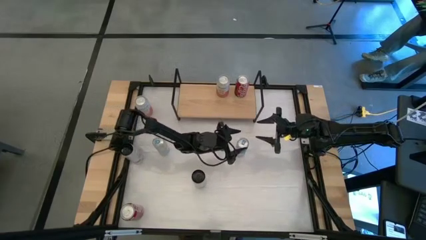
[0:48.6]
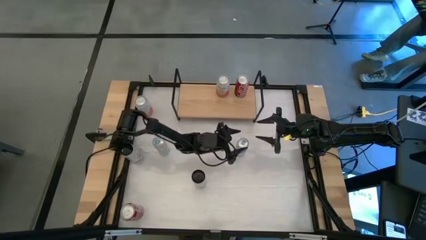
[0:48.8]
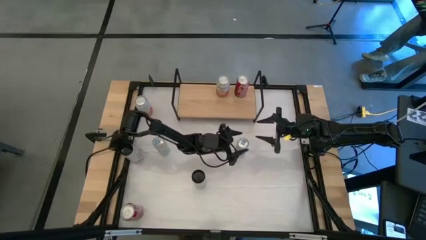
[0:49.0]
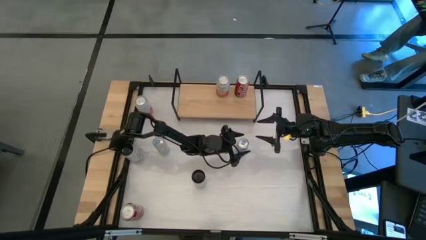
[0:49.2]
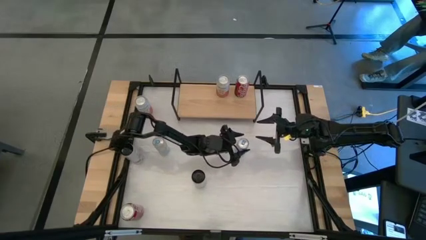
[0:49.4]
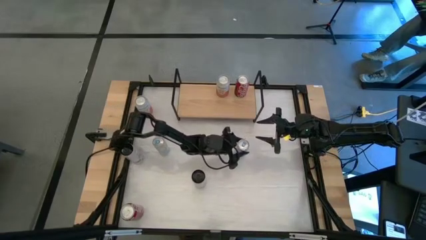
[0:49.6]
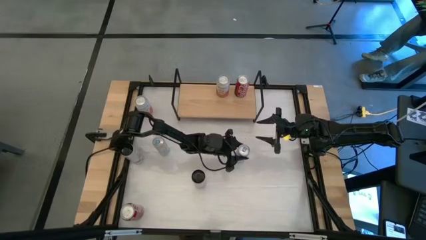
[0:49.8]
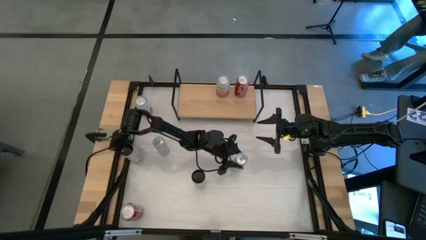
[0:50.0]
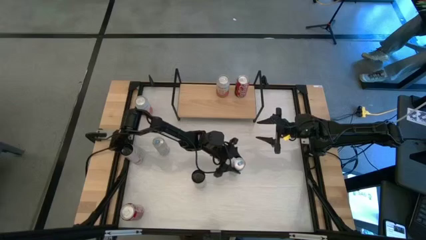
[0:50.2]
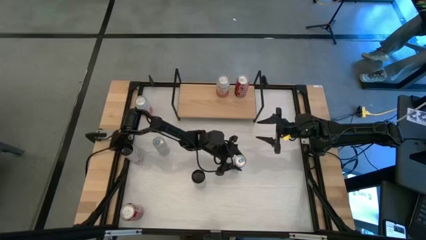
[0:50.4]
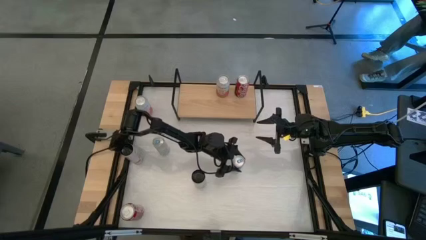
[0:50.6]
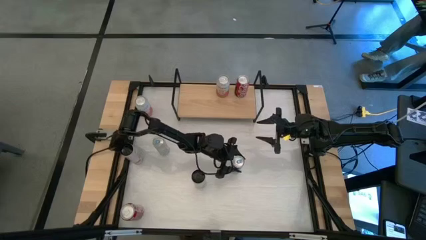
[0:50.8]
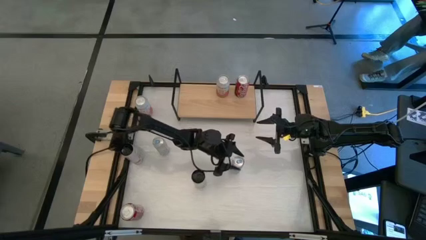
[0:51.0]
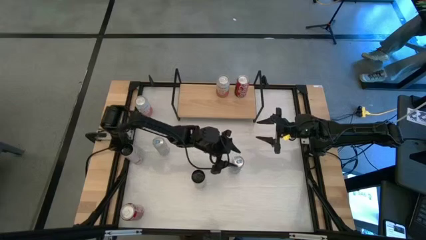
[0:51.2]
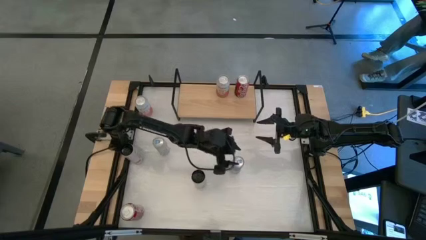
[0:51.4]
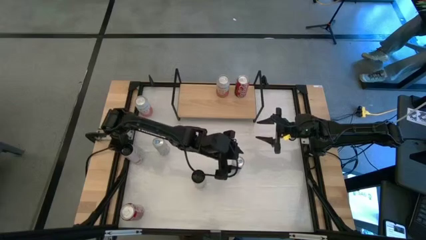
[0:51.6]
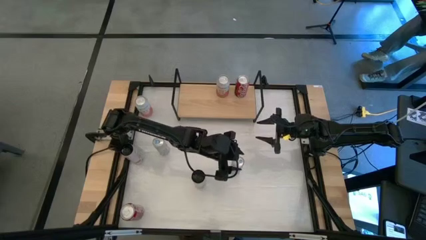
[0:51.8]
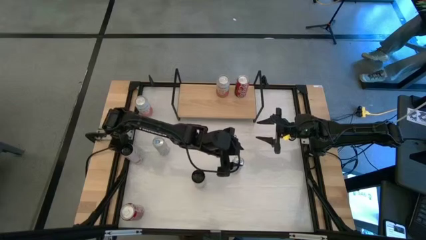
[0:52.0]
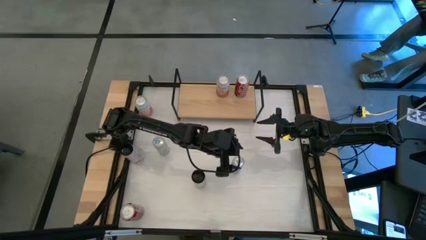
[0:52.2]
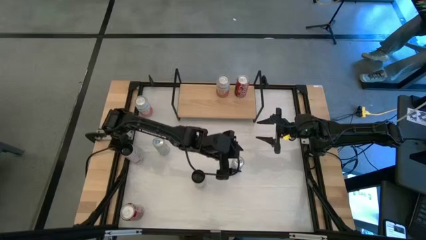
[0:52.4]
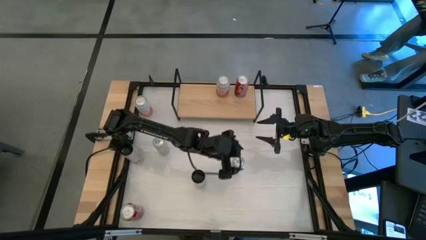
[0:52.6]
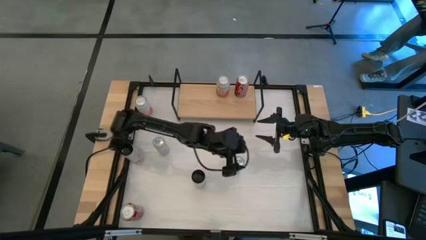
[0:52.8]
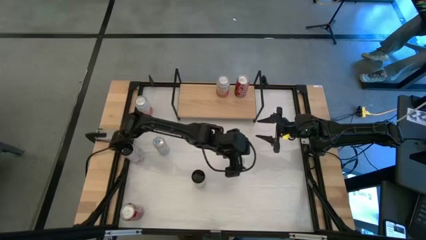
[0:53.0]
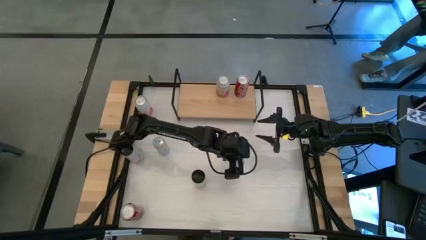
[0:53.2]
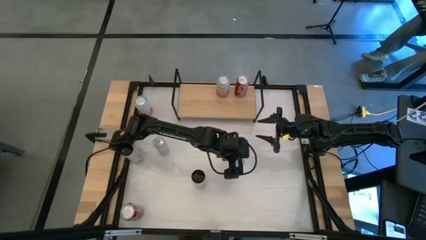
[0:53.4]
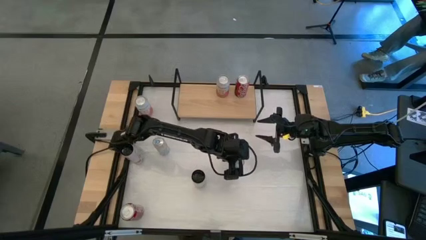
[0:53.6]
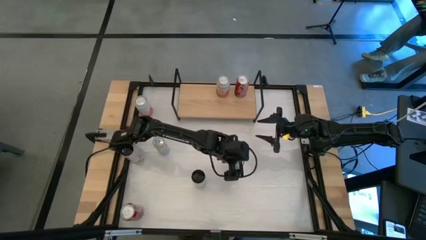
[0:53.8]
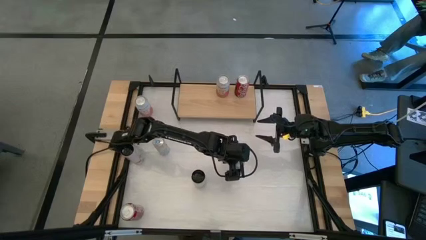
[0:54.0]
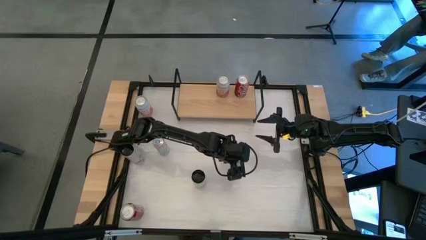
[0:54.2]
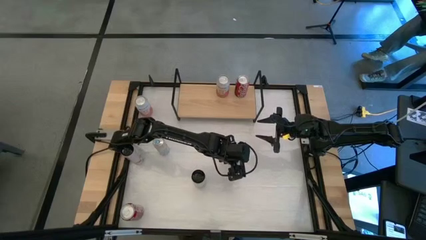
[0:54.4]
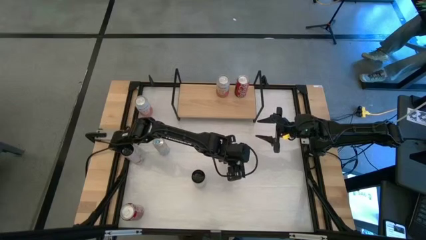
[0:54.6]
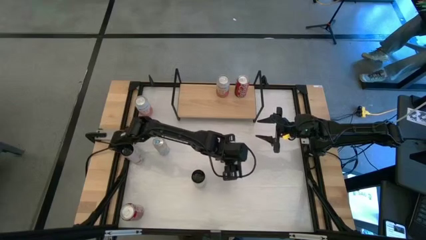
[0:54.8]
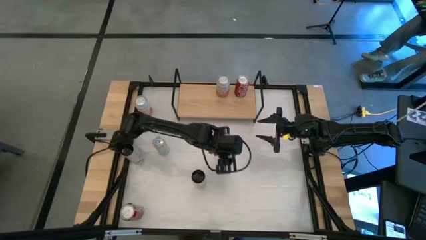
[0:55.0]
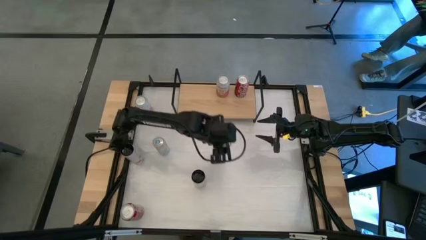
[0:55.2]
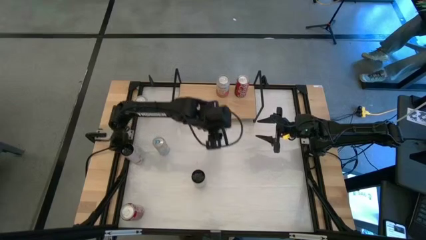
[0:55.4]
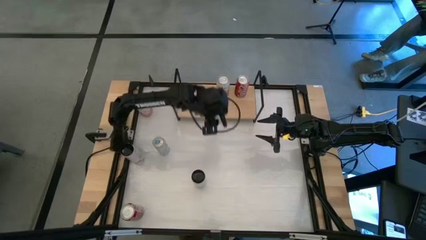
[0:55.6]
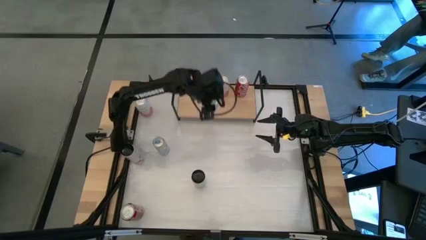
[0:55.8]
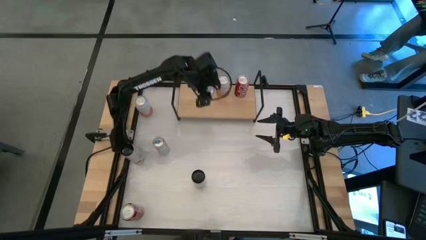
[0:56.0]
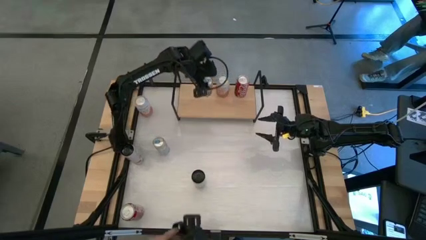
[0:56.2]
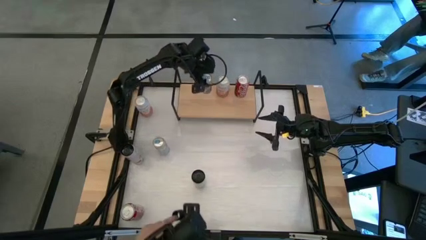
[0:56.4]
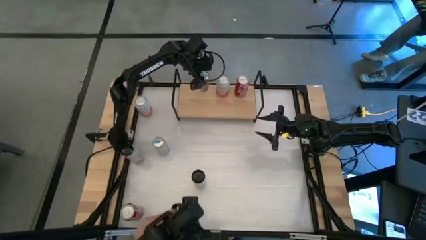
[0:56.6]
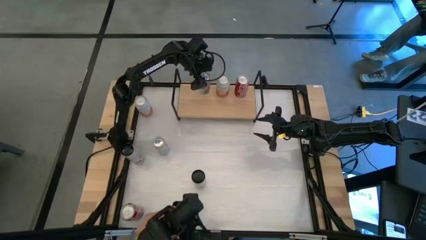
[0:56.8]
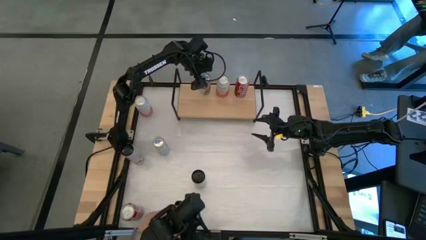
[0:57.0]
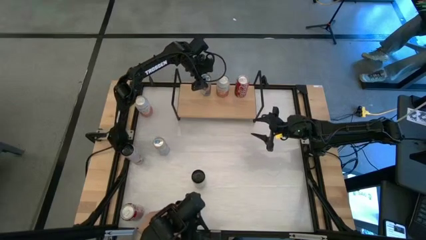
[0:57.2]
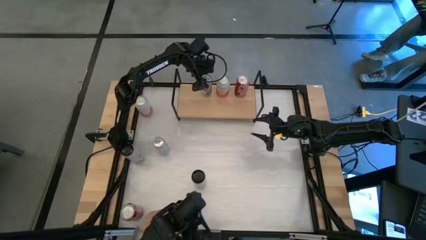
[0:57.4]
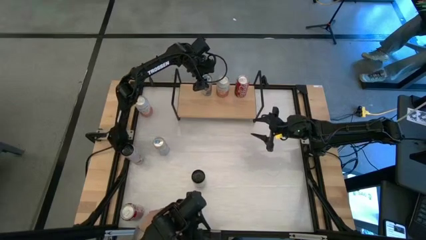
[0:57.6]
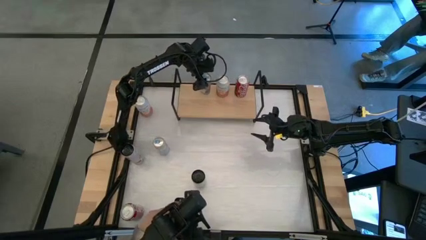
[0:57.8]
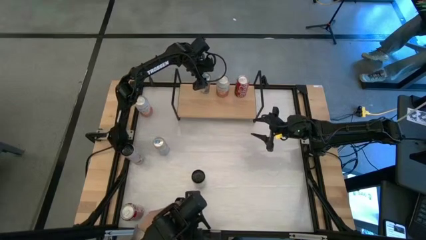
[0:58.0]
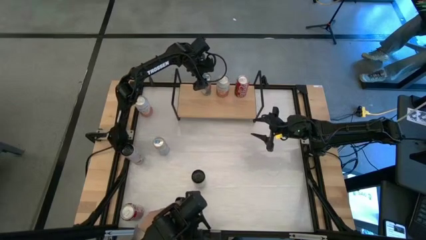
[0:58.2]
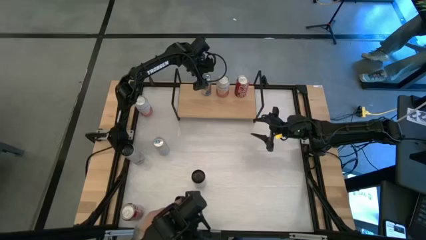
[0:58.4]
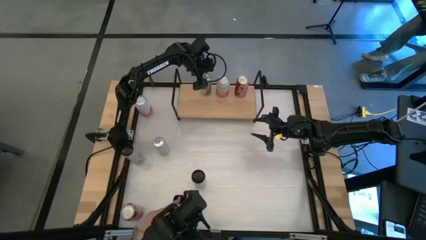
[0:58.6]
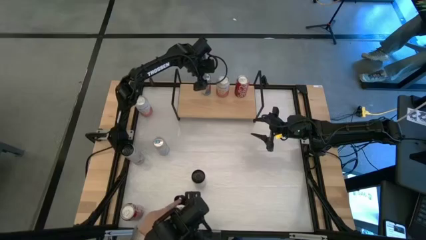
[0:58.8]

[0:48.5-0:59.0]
Task: Place canned beverage on shelf
Put the bottom blue soda can on the shelf

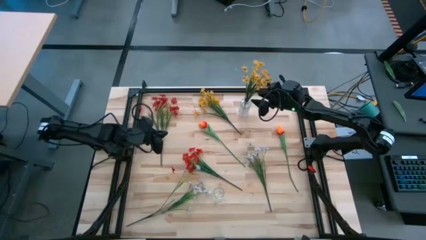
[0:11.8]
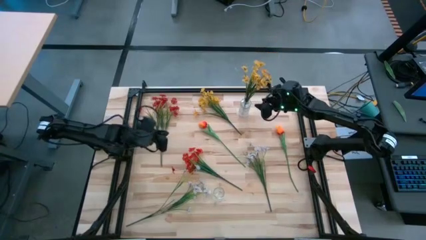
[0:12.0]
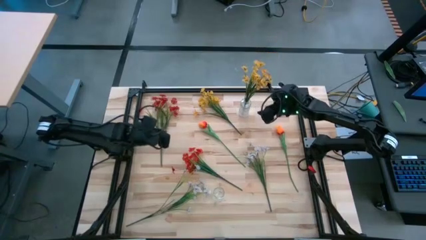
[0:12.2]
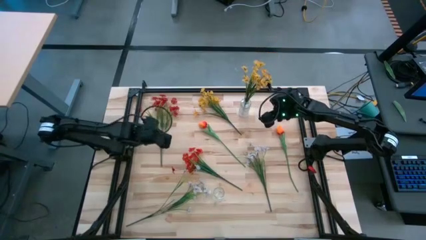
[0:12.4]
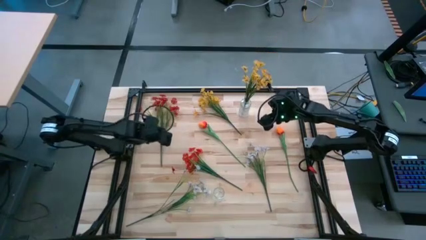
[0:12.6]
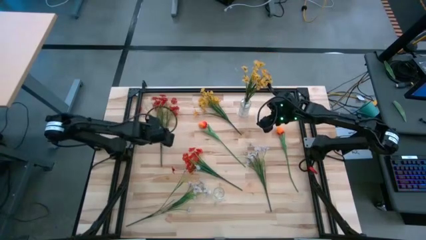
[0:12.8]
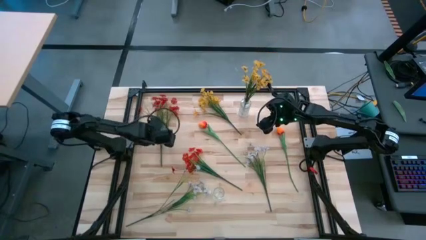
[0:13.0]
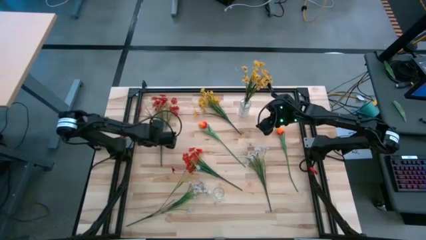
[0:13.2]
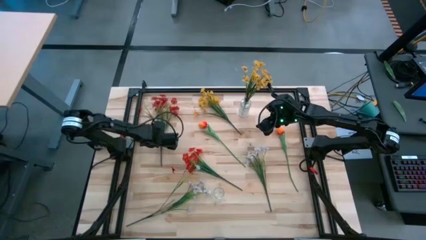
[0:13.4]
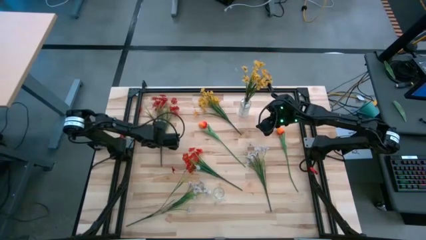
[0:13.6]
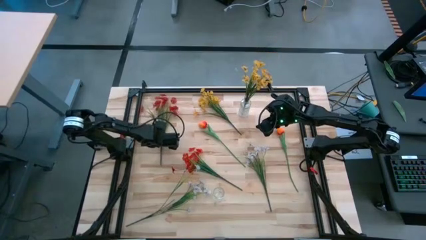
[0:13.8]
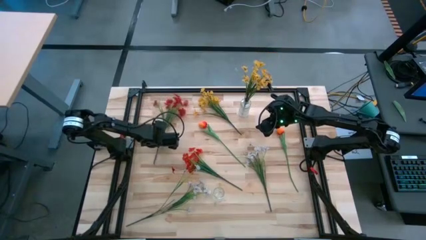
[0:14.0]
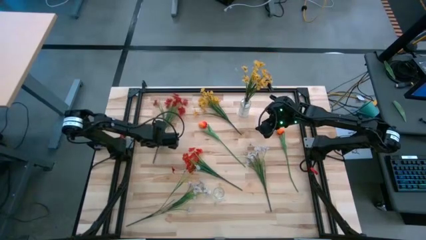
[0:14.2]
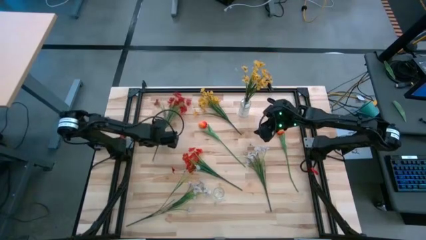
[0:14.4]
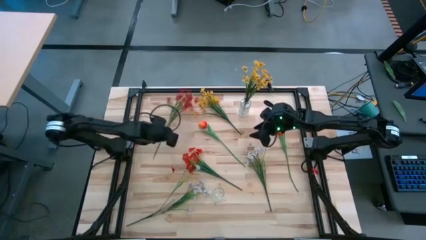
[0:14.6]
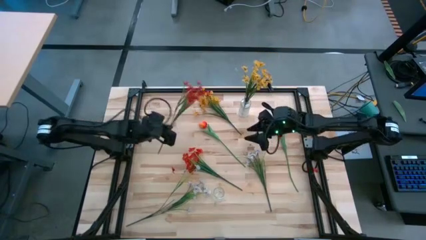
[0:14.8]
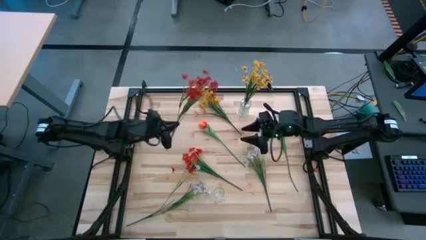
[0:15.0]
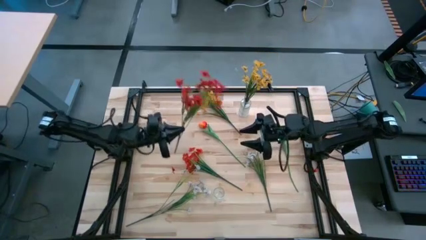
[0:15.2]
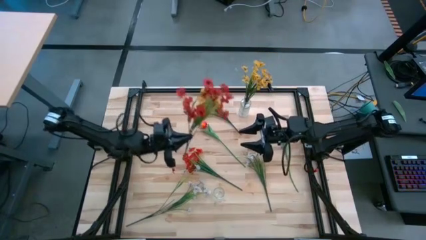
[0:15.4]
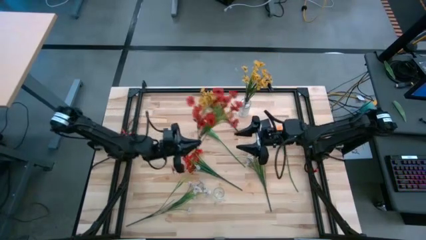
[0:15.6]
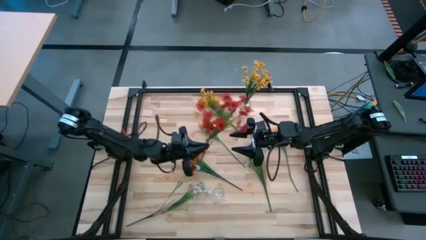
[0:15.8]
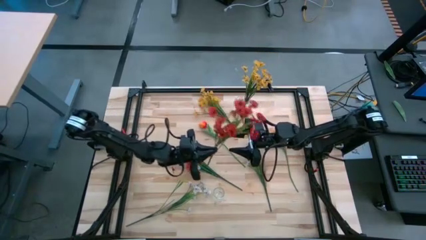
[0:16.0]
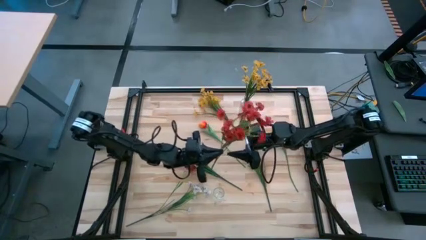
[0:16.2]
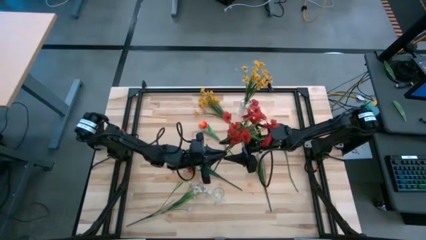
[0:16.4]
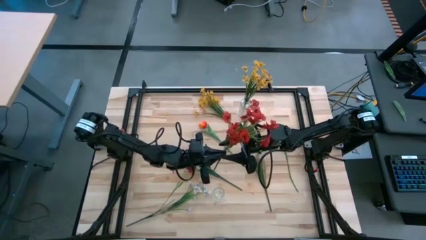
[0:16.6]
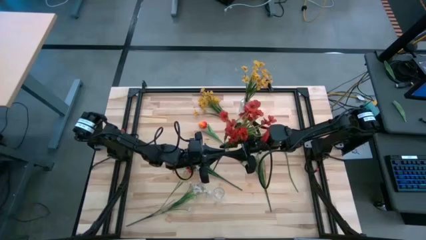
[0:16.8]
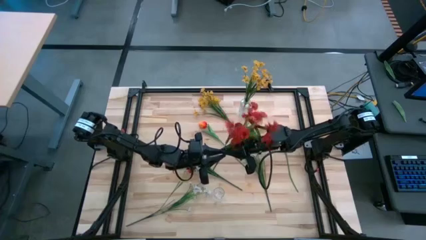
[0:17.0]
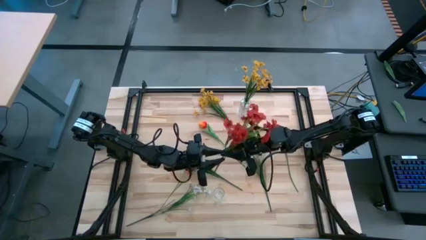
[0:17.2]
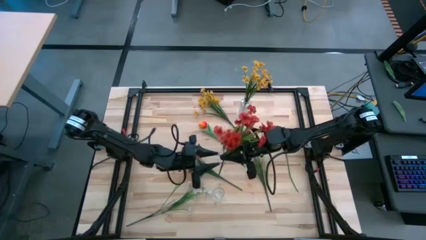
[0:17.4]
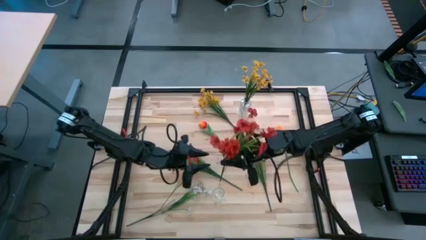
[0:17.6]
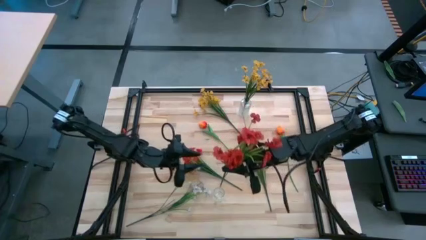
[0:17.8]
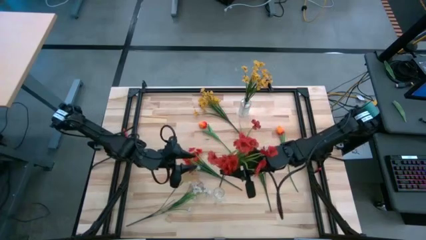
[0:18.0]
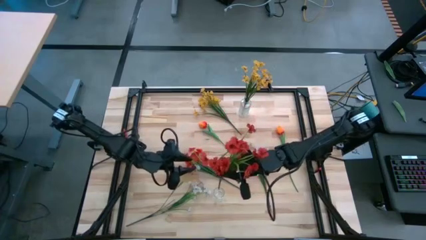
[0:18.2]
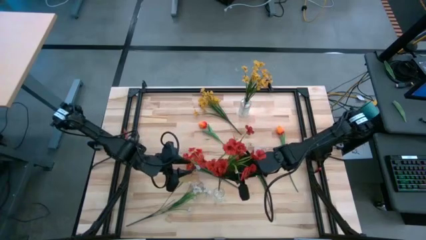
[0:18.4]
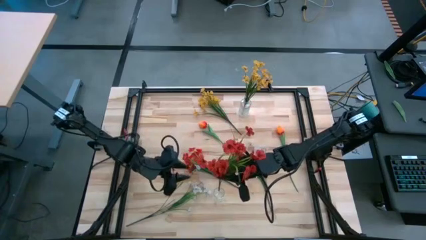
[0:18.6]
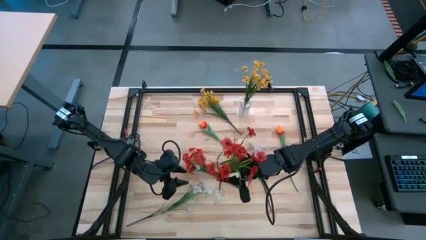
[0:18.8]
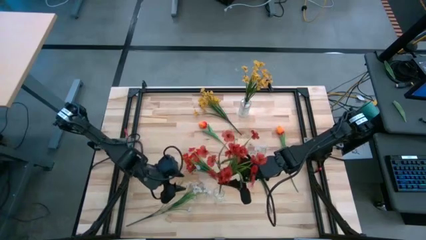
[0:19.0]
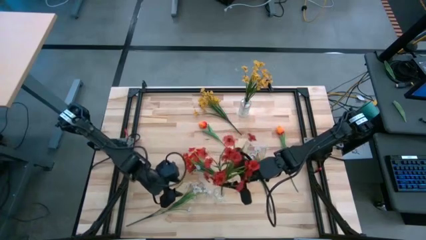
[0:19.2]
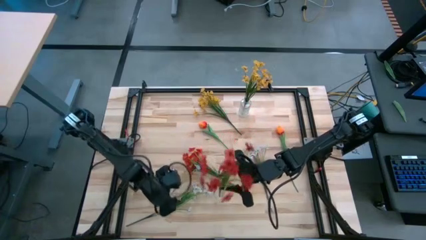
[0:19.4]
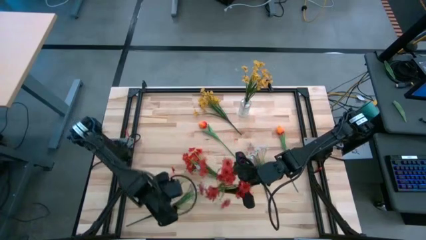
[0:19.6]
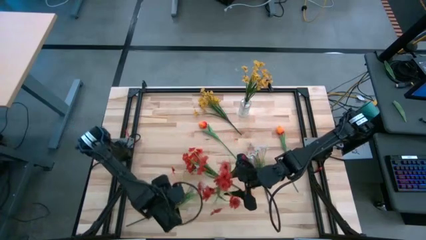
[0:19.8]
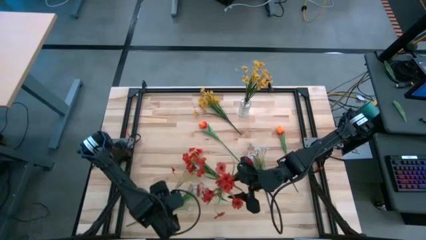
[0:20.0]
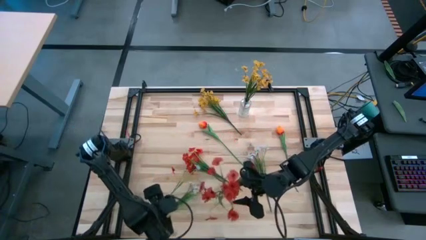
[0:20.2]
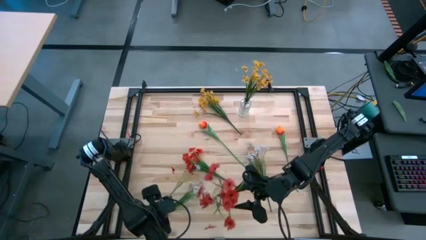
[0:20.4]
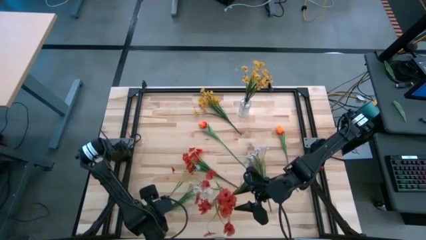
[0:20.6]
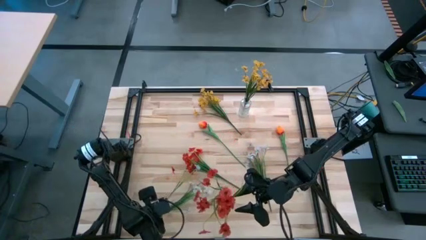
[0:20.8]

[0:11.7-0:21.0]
Task: Sort flowers into vase by color
Put the top red flowers into the bottom transparent vase
